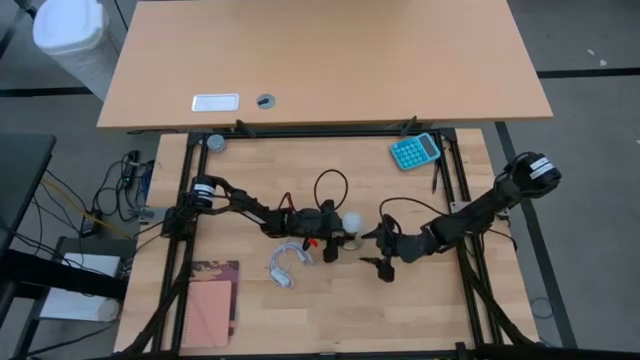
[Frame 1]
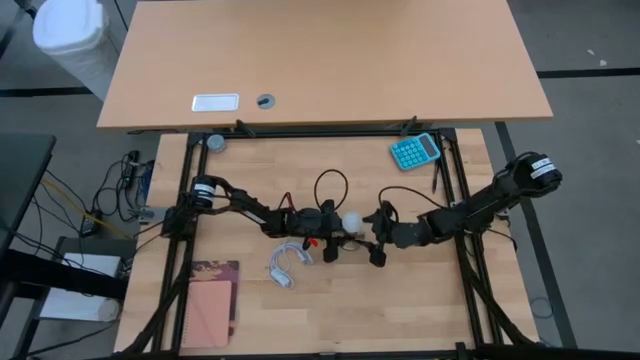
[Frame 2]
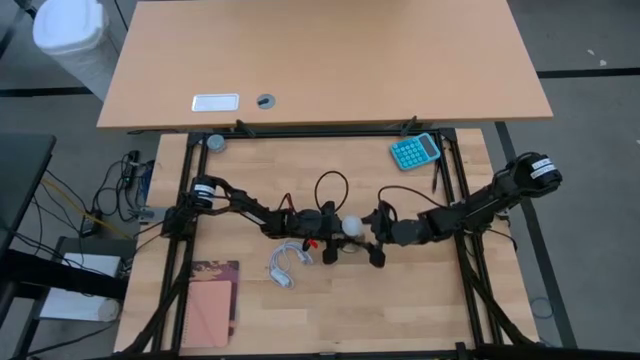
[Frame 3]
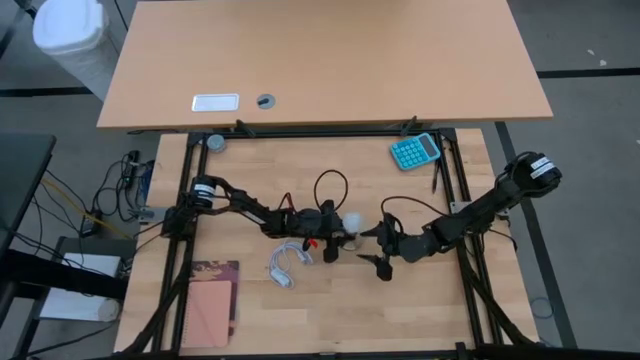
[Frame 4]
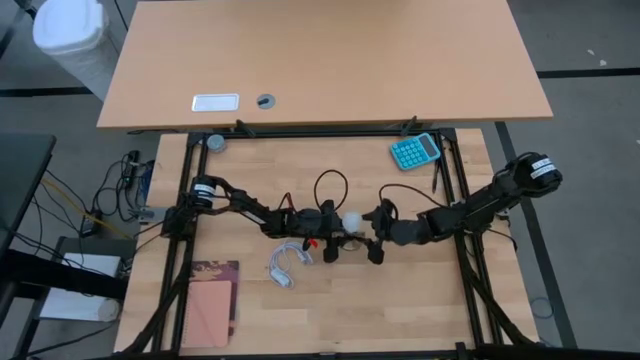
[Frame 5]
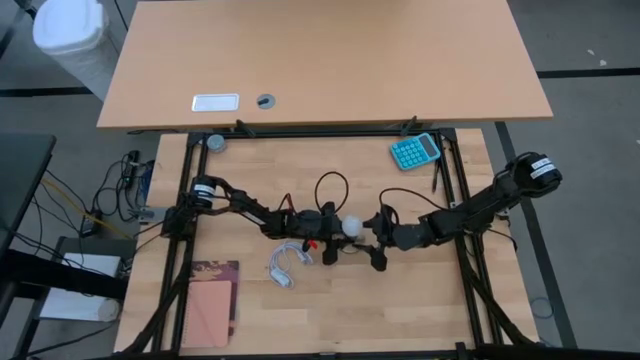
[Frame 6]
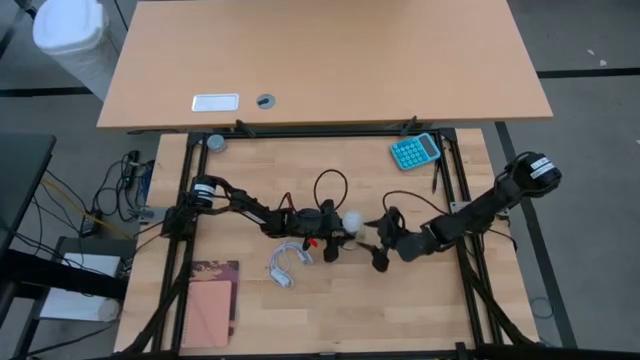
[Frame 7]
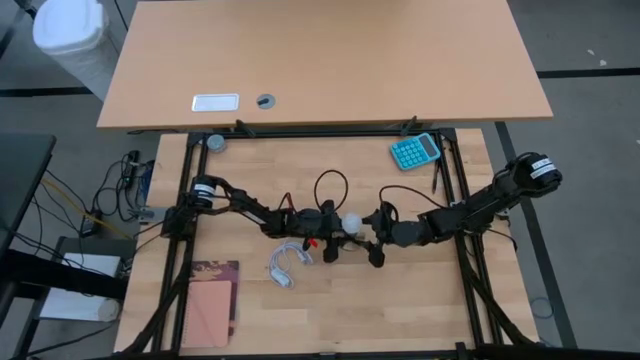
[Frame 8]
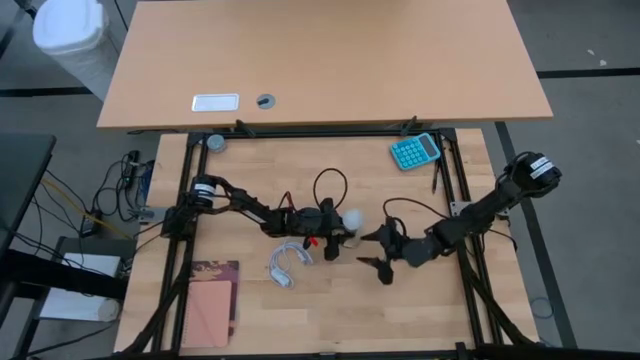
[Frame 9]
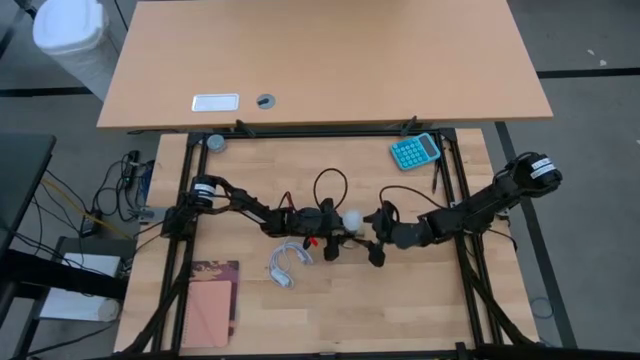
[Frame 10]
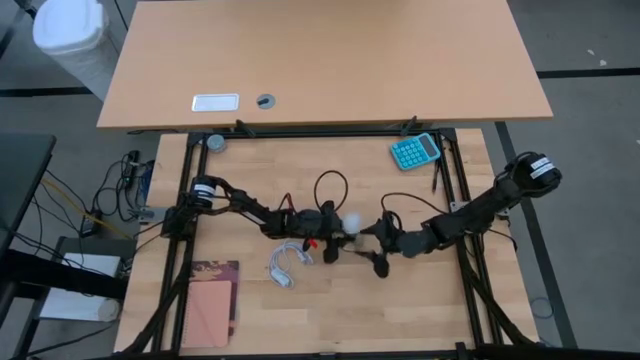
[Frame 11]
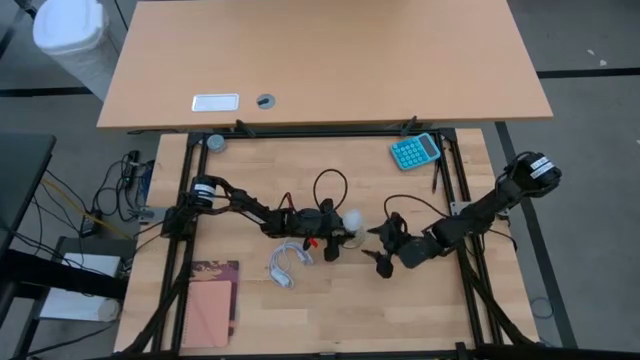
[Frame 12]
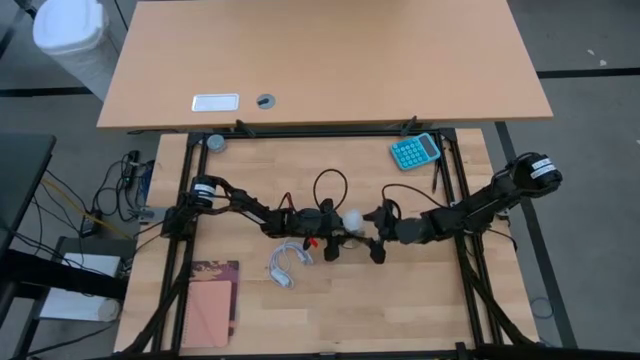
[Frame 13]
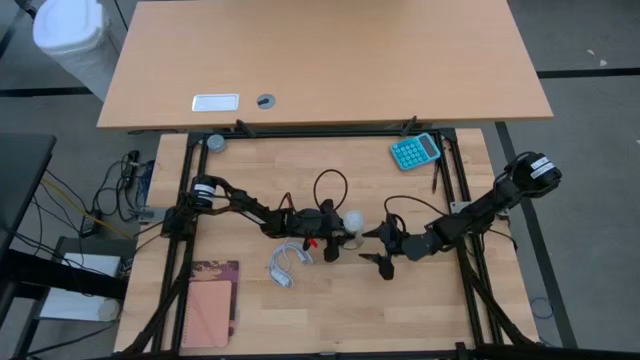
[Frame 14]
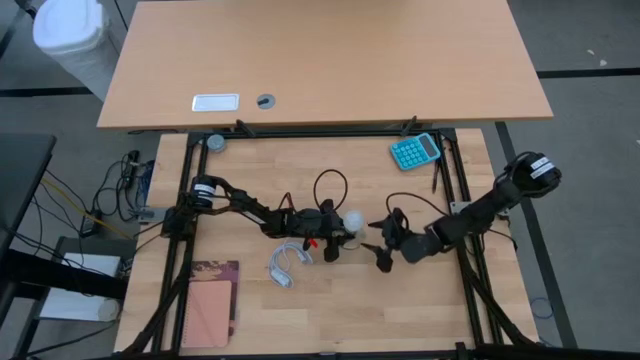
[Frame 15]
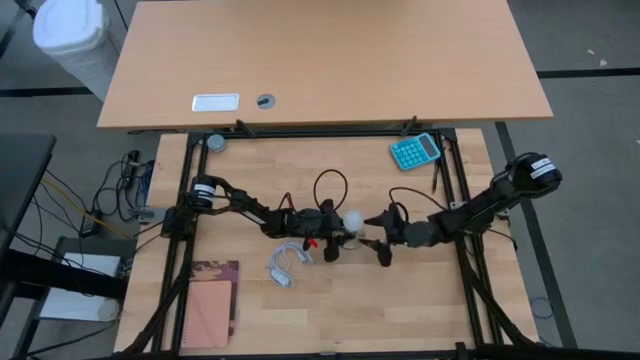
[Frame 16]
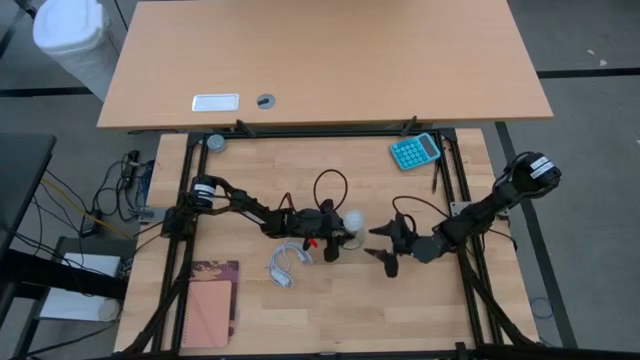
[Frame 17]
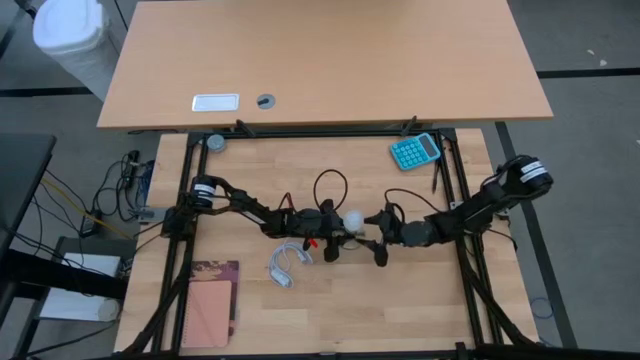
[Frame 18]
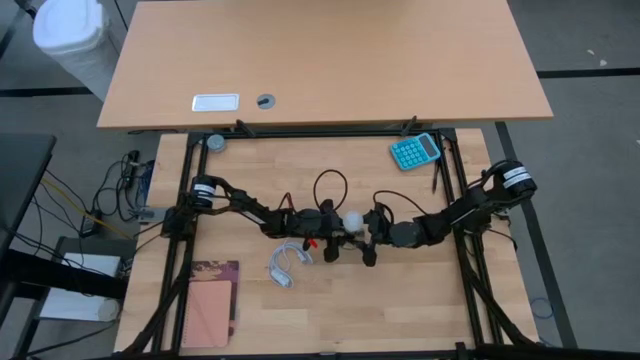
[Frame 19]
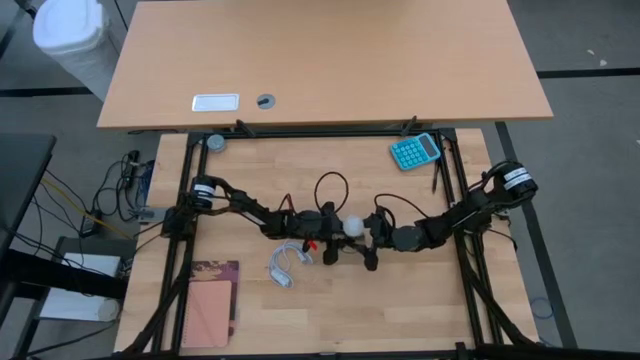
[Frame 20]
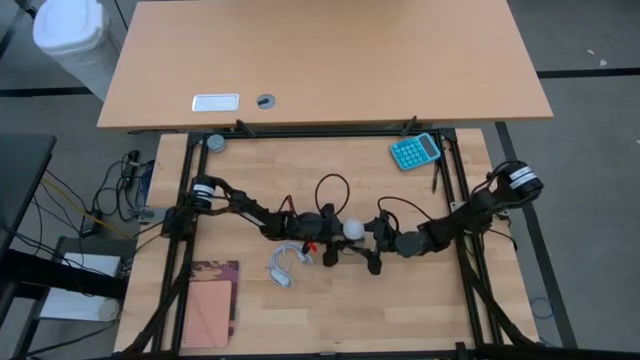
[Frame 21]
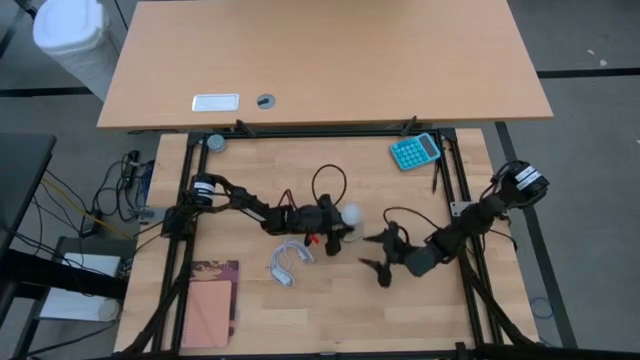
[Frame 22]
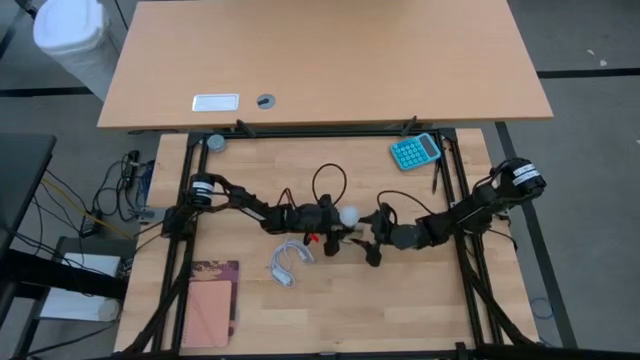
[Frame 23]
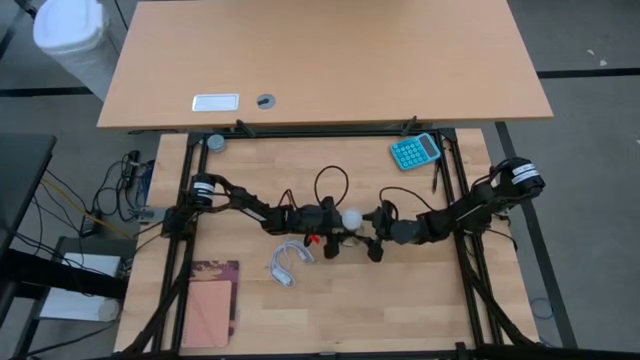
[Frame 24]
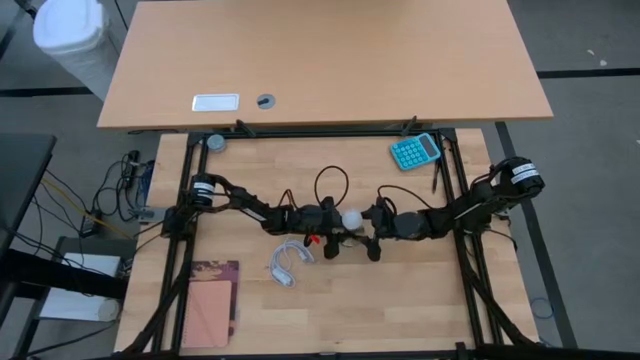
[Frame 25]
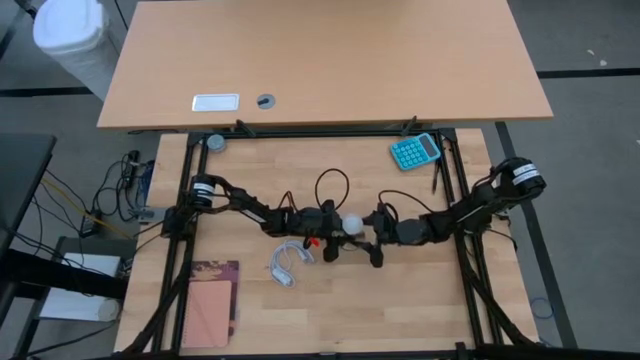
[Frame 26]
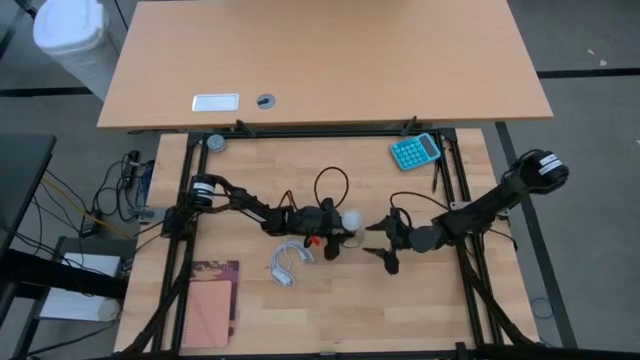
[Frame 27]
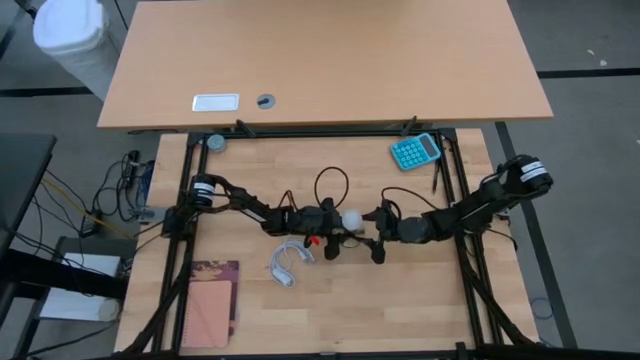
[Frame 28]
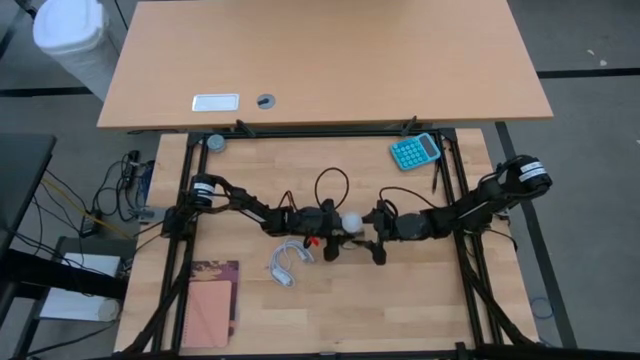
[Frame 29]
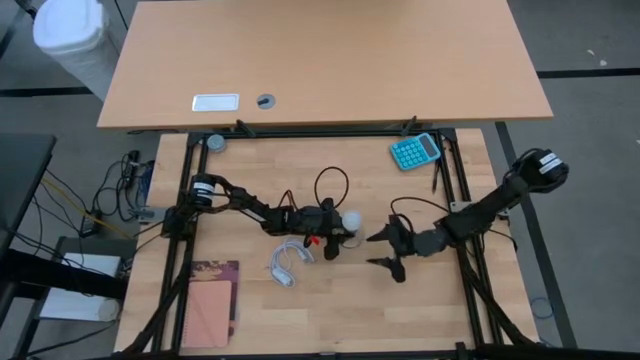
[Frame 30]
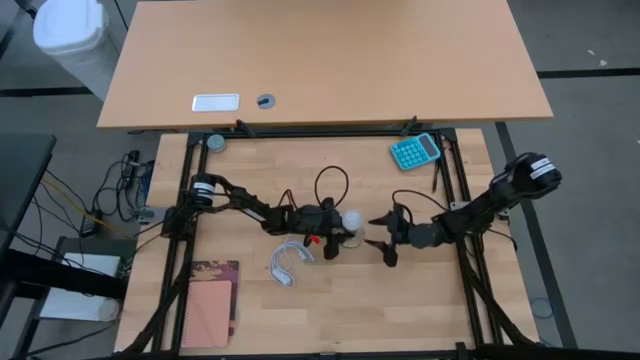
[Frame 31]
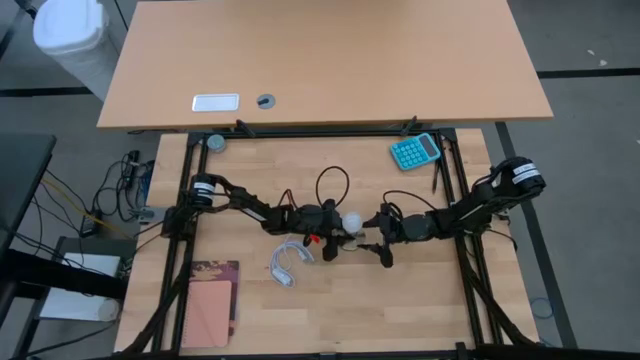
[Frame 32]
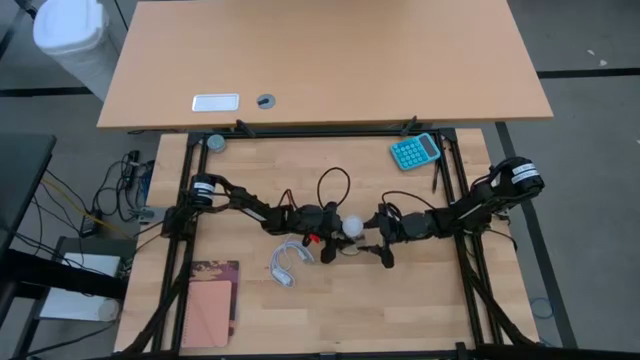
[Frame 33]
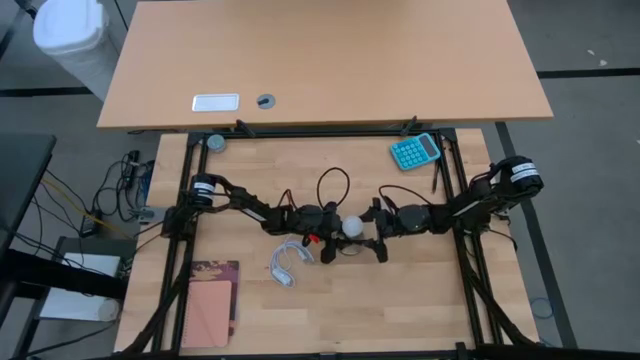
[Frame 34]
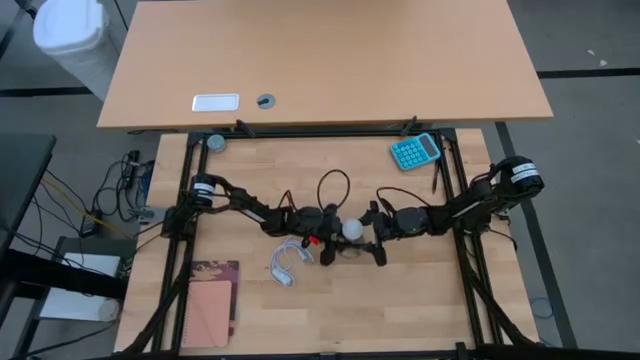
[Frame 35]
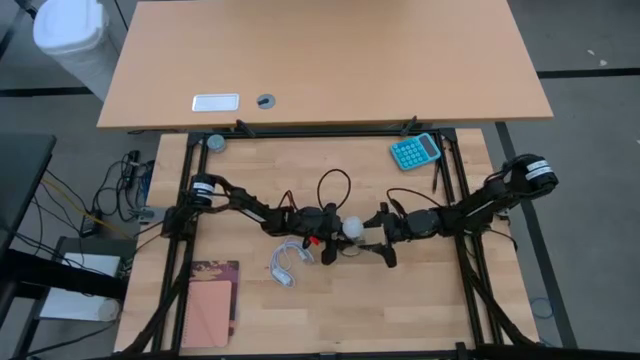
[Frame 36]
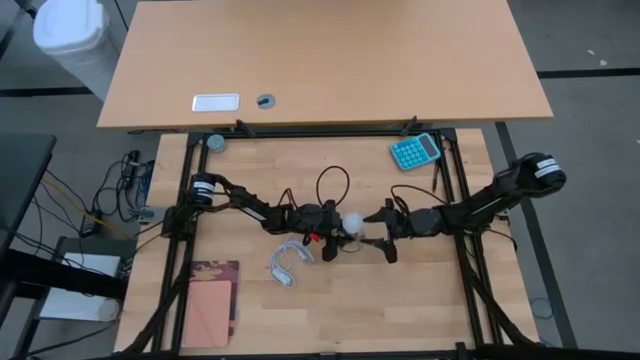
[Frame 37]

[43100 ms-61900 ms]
Task: Screw lightbulb
Insert the lightbulb into the lamp socket
